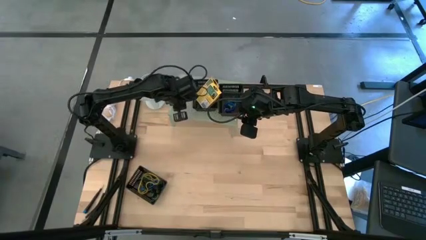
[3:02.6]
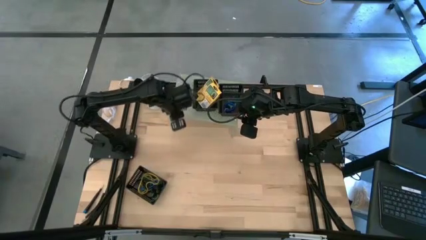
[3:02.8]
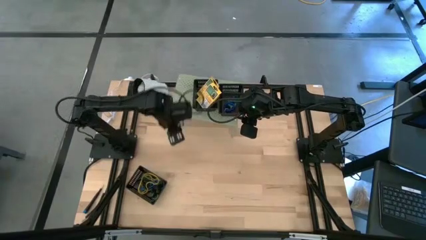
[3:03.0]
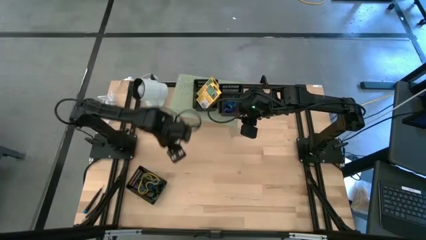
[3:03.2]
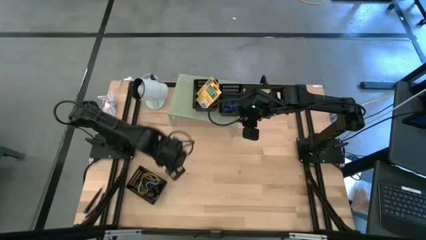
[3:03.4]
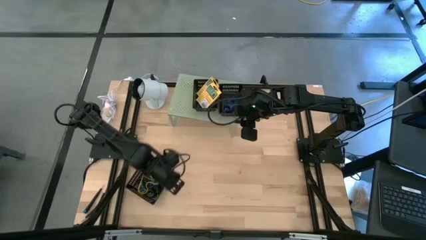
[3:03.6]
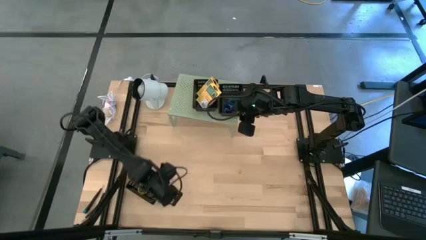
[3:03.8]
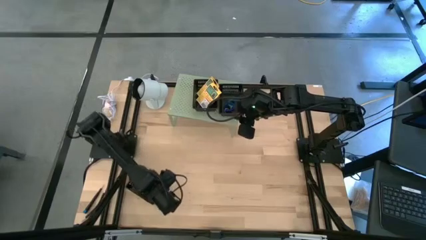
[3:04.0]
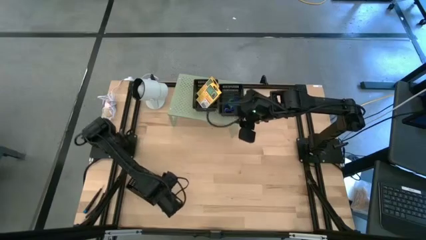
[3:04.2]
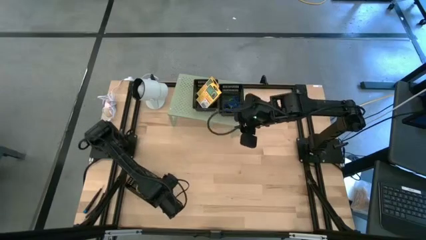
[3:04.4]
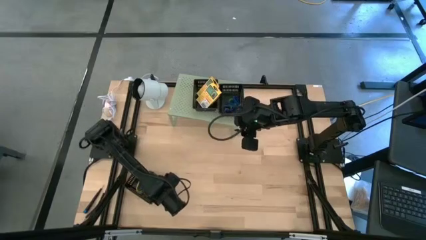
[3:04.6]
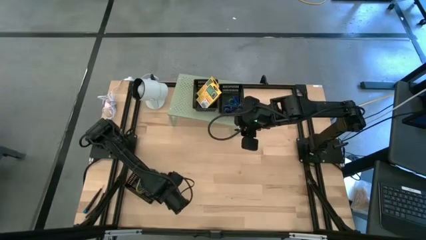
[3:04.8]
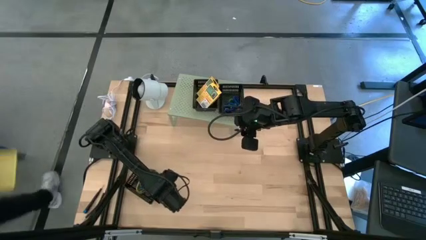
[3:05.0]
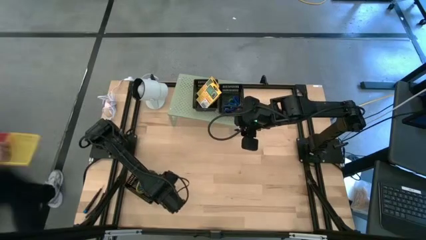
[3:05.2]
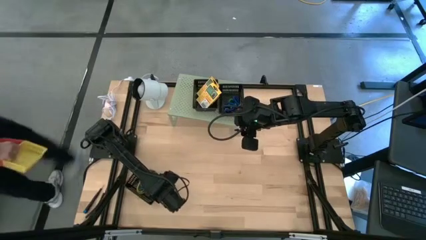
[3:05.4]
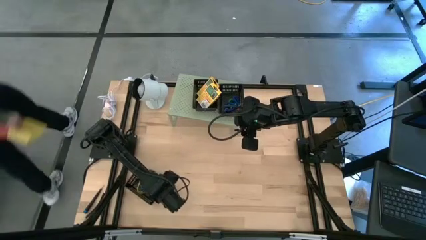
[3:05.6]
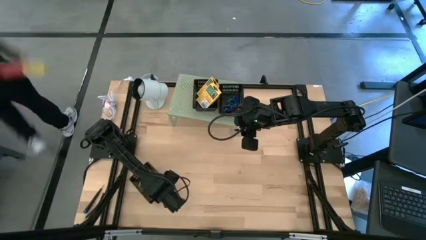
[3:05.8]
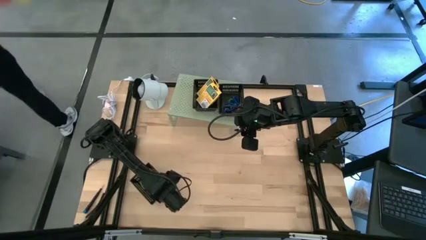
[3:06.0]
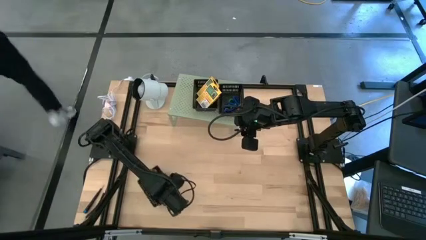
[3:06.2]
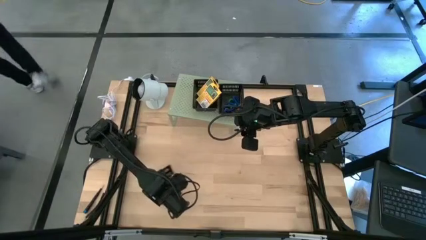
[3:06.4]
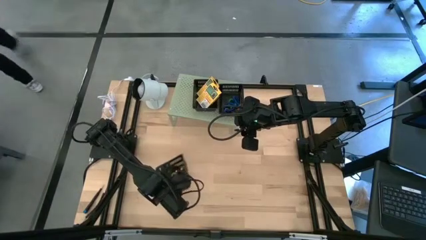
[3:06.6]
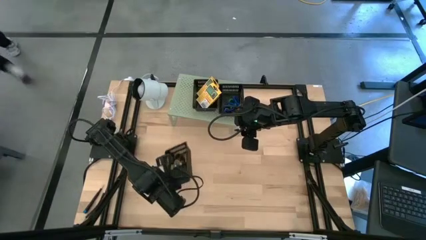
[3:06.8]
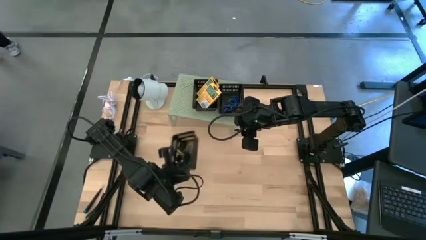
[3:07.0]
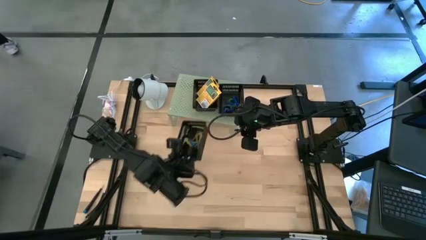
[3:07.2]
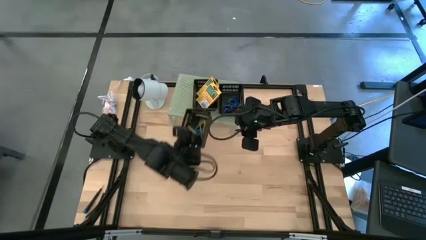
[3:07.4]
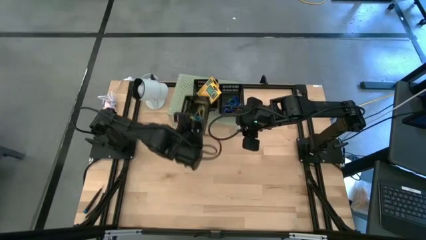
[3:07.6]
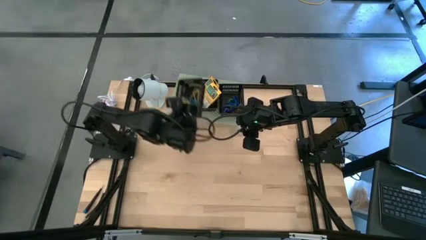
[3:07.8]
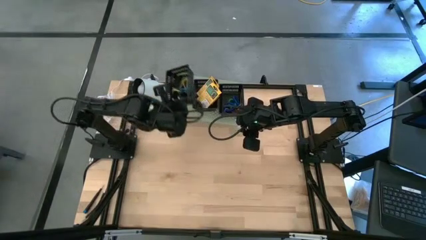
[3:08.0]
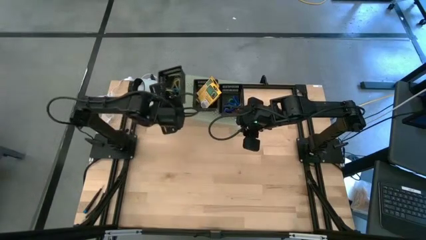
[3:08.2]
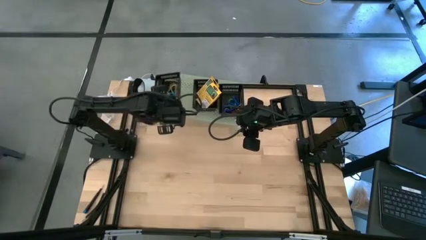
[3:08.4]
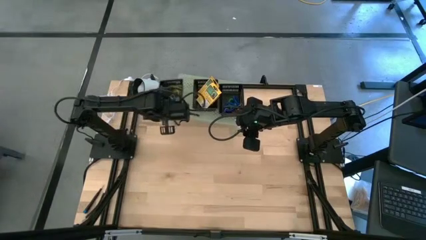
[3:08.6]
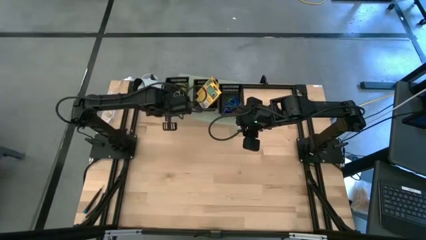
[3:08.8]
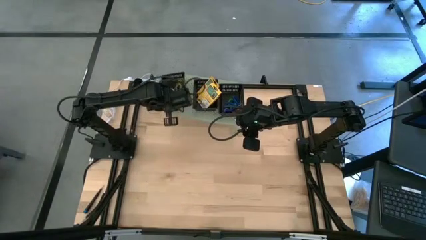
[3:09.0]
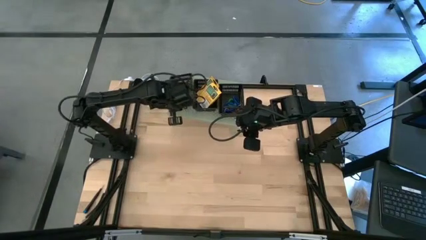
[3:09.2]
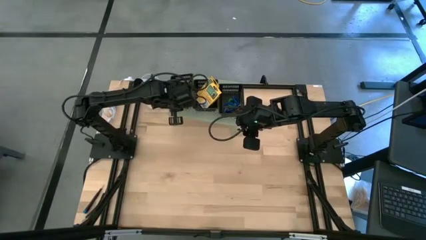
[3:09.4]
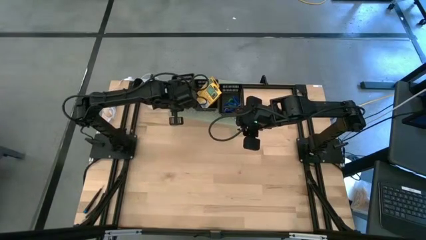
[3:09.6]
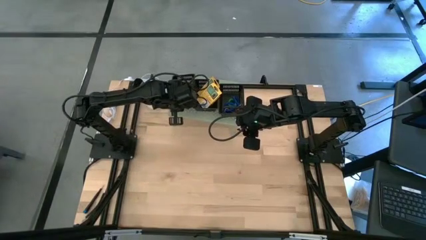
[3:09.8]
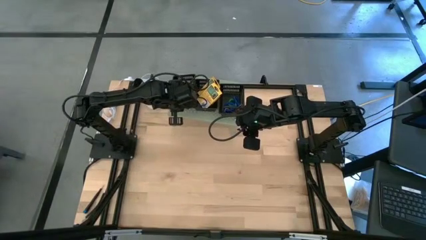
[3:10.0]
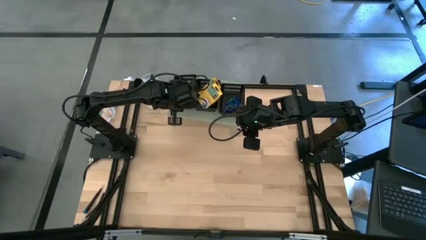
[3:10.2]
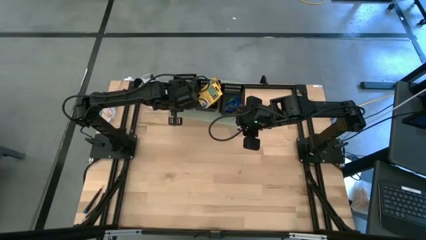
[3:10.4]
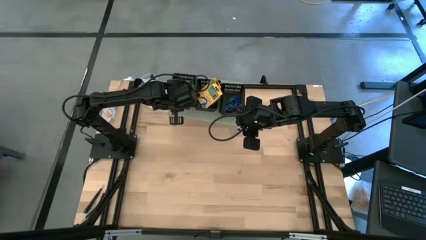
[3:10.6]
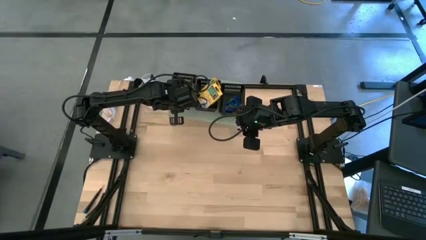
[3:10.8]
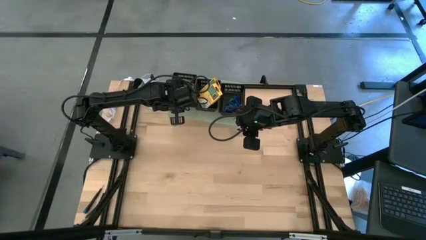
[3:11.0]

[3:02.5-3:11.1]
Task: Pick & Place Office Desk Supplies
Put the black bin on the shelf

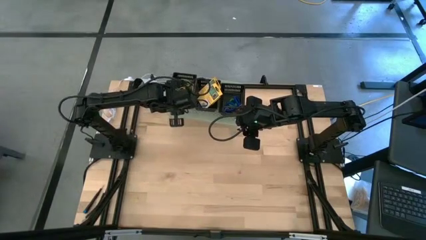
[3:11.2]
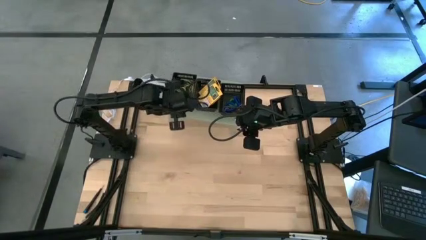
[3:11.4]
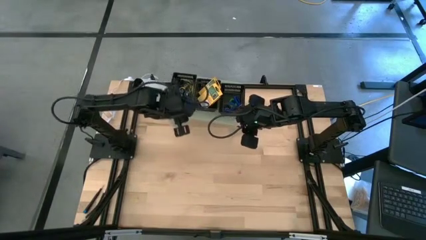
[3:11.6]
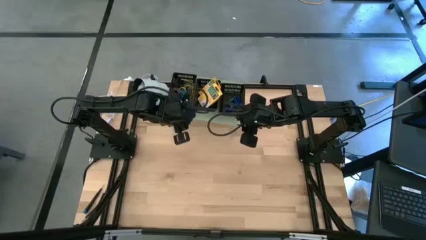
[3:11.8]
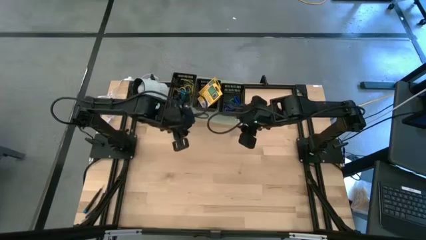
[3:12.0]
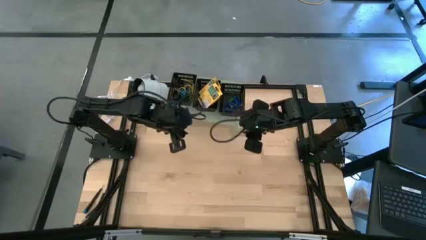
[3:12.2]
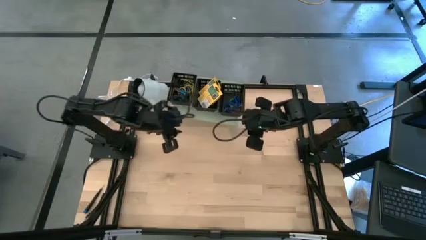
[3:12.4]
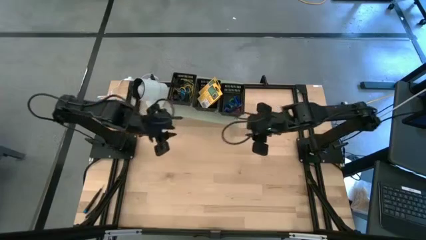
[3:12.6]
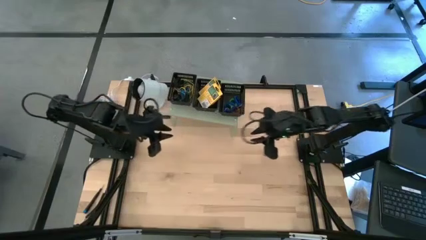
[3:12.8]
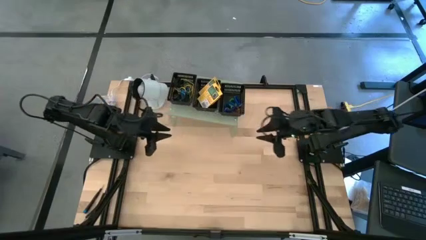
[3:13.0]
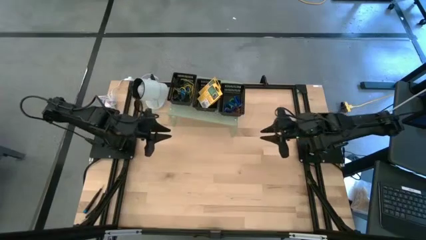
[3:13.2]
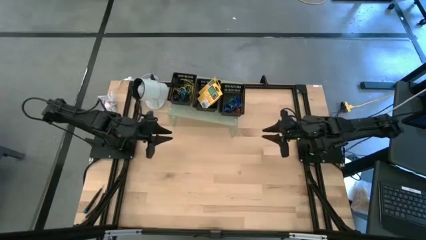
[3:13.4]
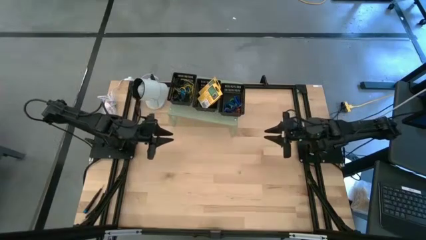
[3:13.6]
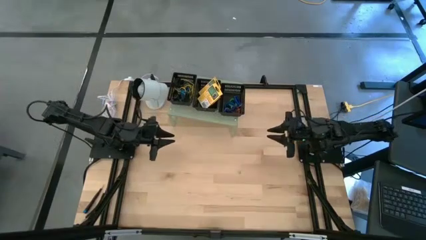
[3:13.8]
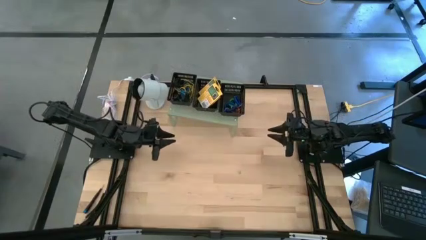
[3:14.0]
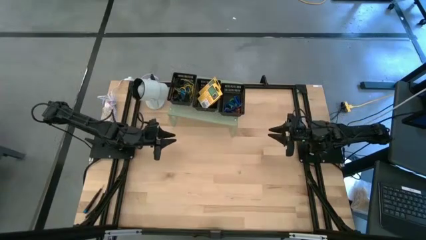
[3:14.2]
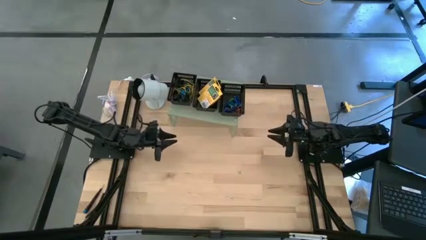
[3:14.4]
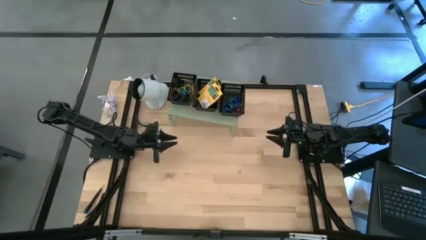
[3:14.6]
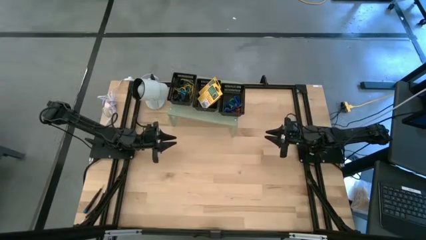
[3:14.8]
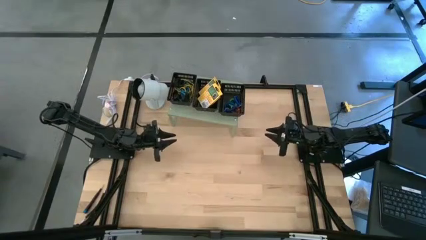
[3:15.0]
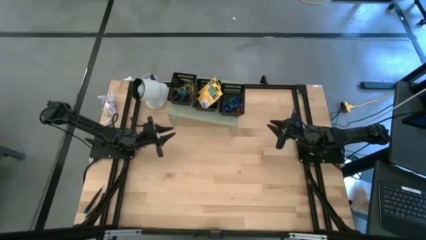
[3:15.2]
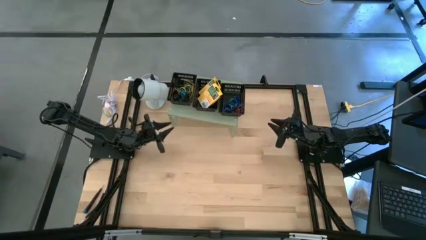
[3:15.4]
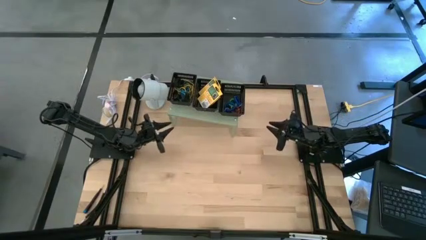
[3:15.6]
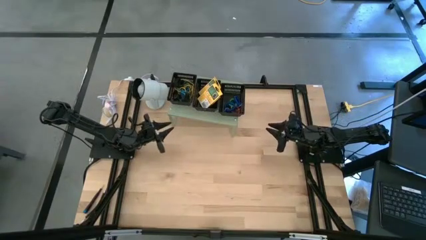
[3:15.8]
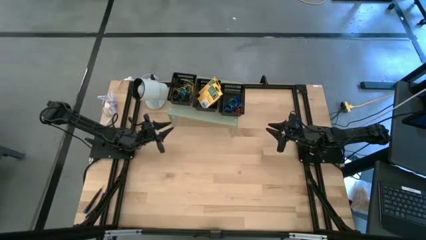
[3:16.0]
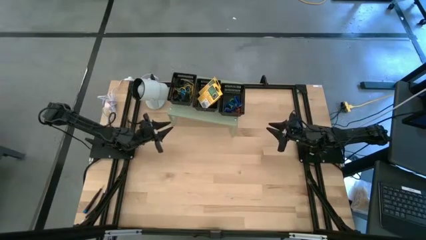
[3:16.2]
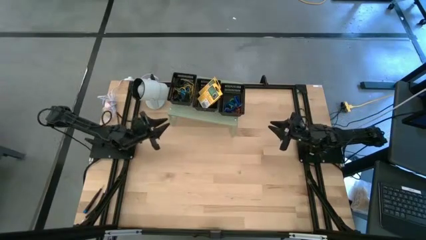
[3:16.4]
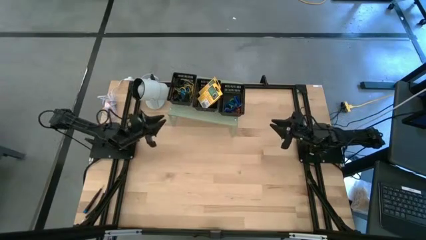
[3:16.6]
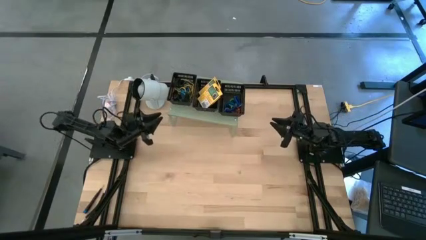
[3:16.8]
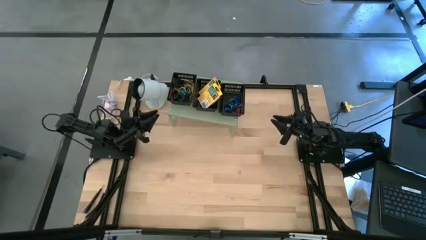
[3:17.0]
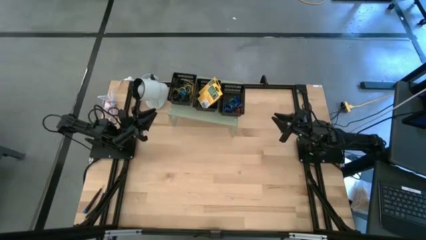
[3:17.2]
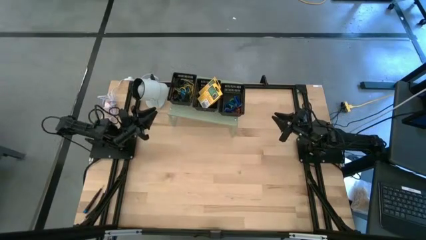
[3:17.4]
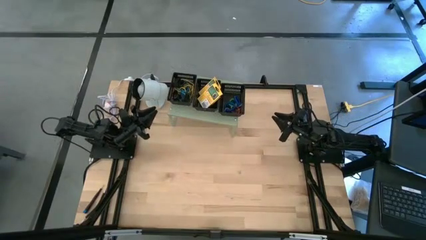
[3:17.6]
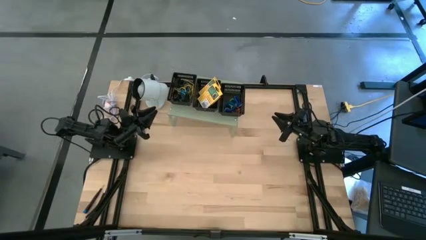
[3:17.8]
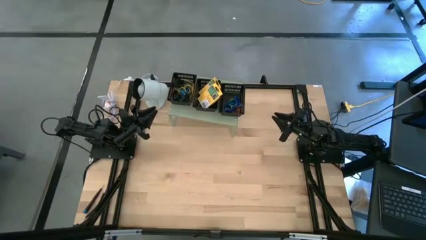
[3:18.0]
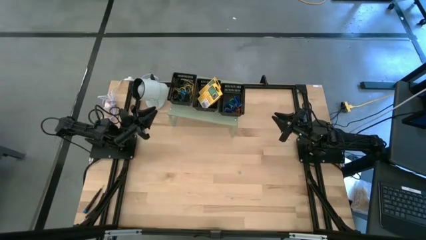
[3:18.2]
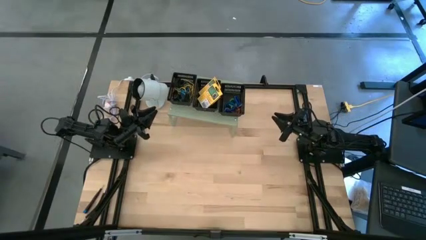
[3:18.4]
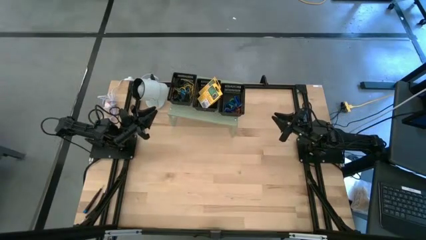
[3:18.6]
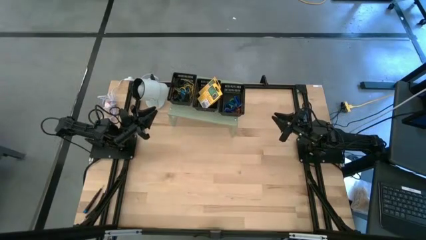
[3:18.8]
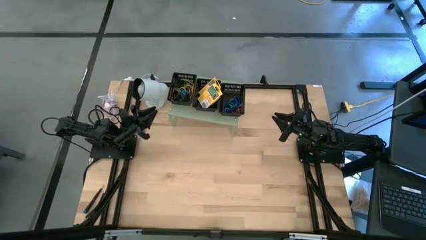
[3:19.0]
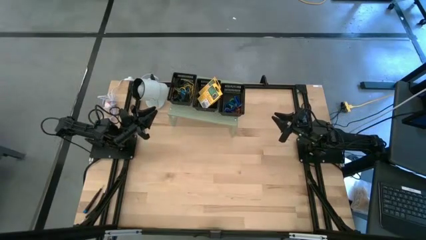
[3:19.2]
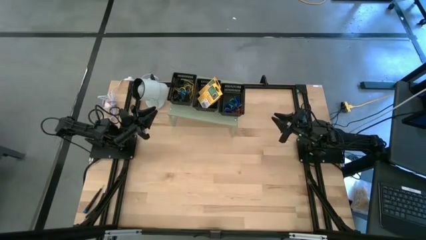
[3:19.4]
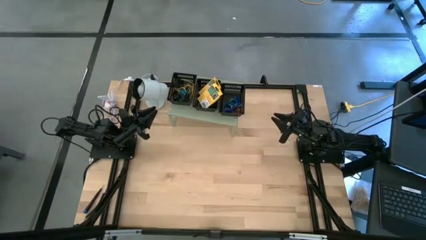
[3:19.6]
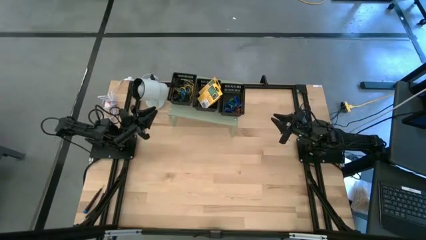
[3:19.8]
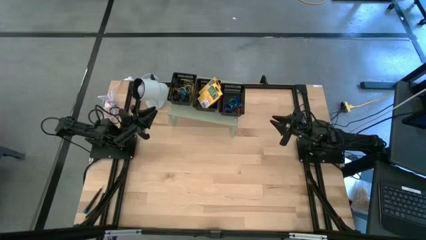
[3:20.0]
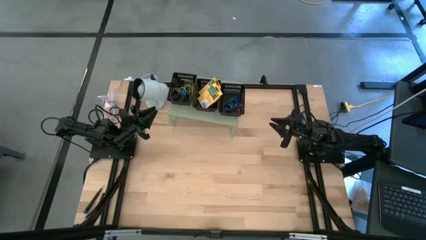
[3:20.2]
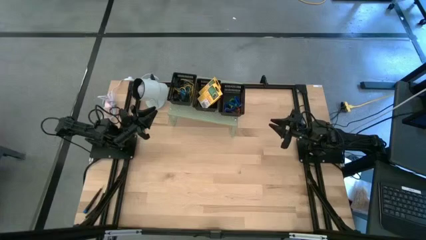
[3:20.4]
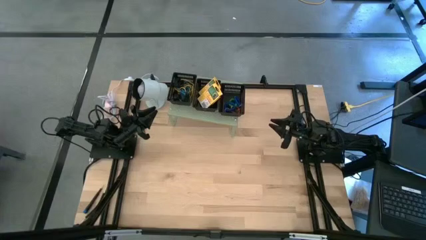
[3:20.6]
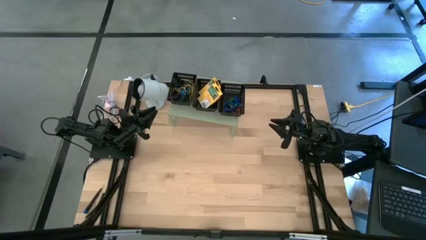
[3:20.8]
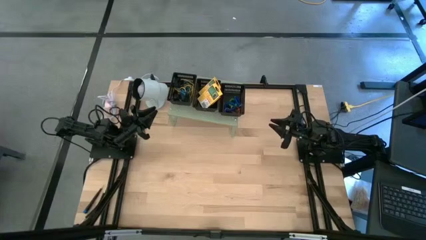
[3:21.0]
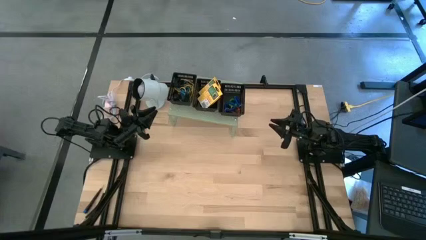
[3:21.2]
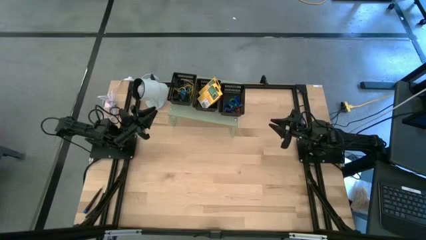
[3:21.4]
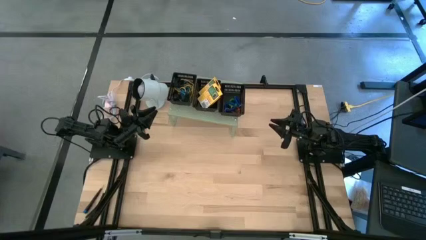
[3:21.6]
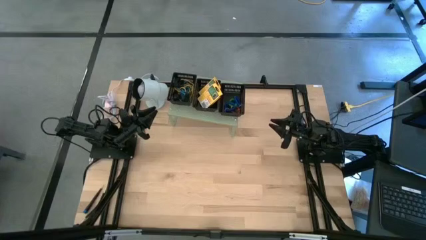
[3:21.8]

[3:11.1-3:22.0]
Return to Home Position
